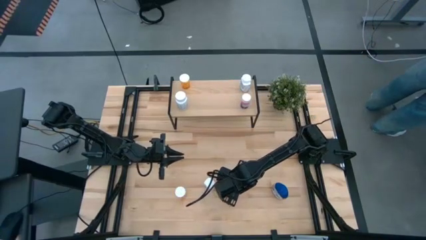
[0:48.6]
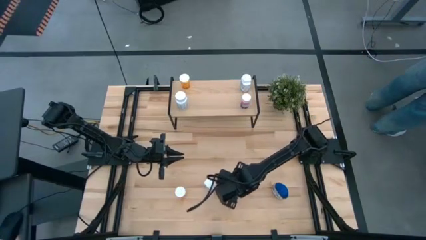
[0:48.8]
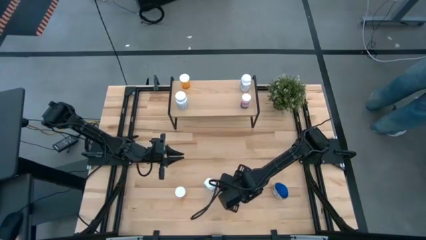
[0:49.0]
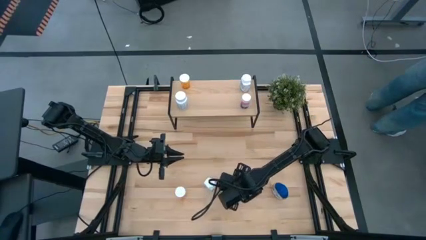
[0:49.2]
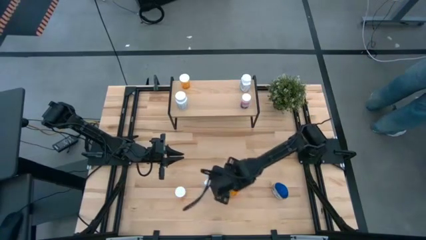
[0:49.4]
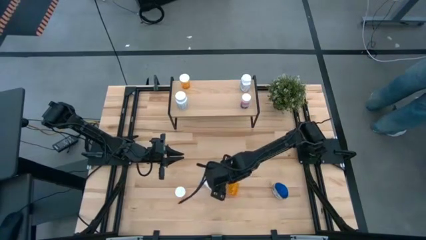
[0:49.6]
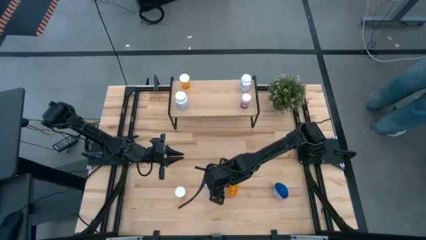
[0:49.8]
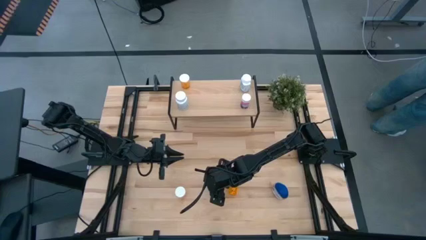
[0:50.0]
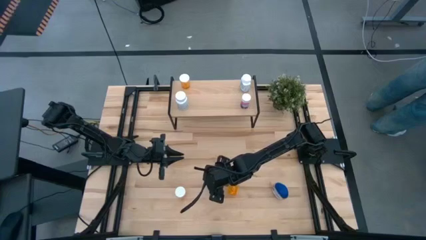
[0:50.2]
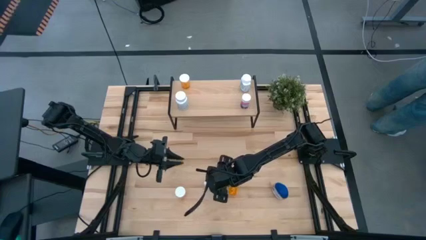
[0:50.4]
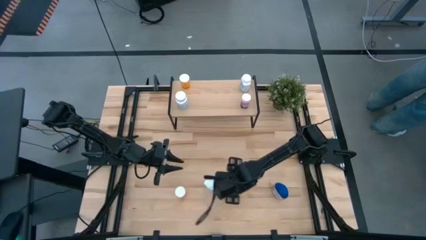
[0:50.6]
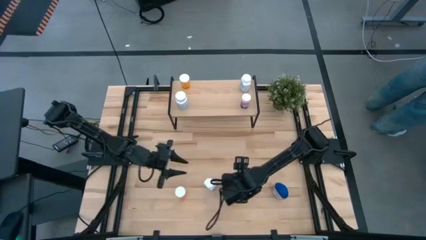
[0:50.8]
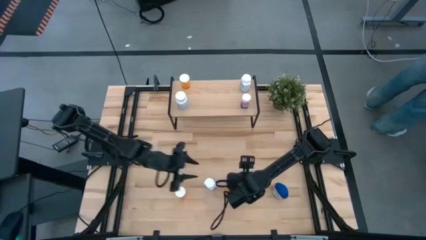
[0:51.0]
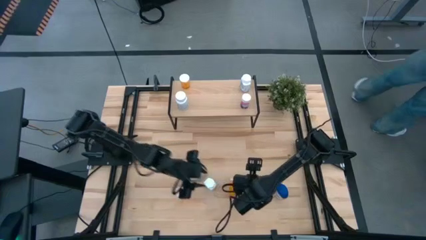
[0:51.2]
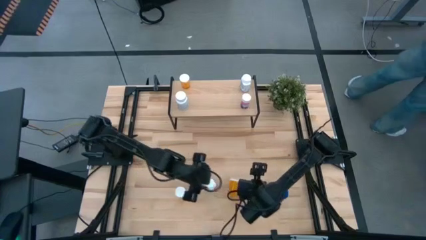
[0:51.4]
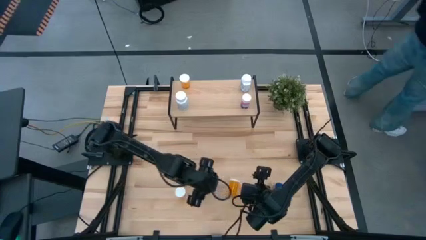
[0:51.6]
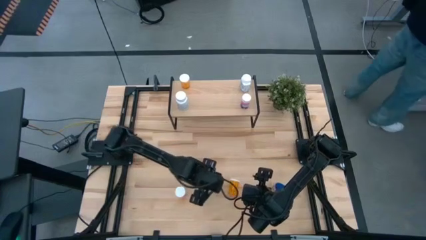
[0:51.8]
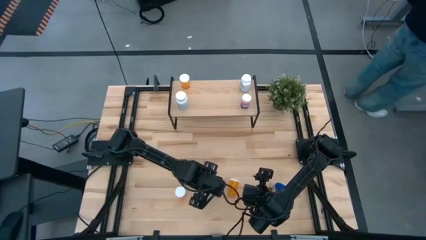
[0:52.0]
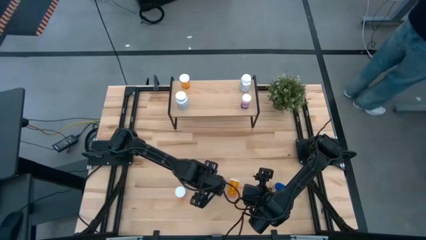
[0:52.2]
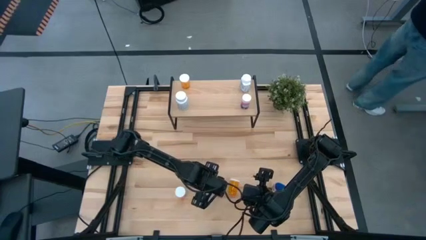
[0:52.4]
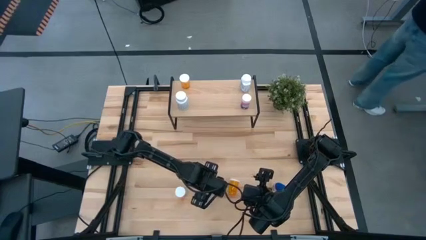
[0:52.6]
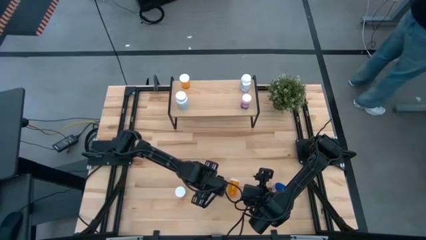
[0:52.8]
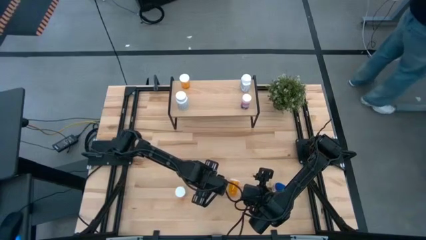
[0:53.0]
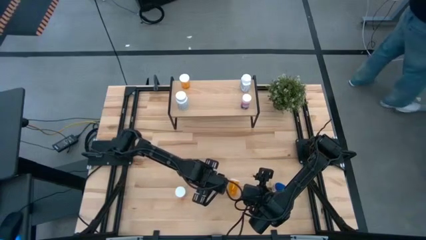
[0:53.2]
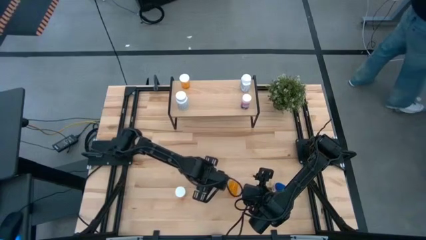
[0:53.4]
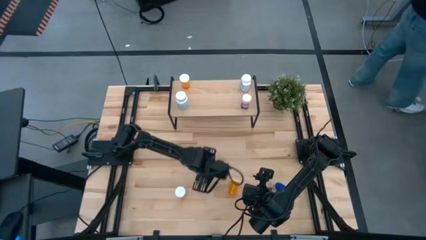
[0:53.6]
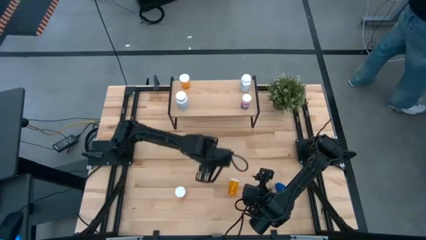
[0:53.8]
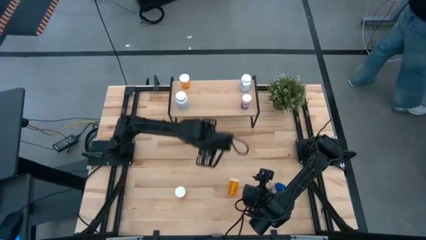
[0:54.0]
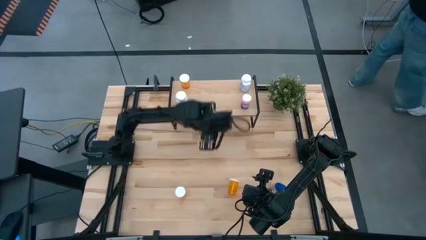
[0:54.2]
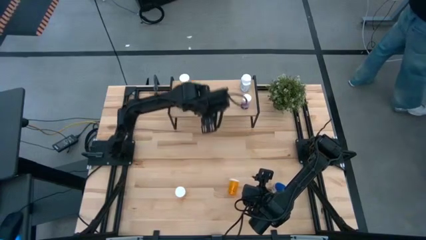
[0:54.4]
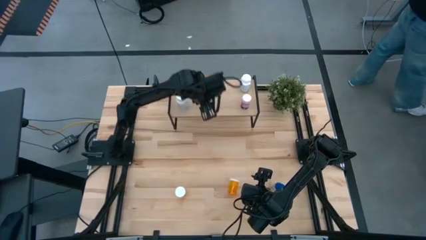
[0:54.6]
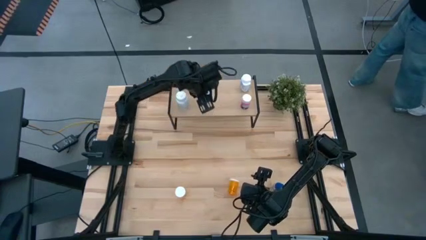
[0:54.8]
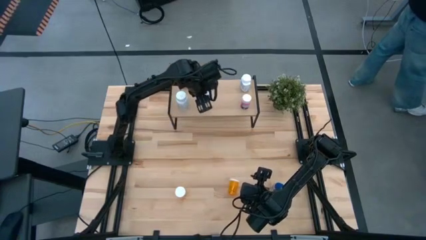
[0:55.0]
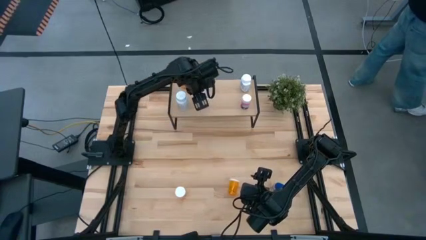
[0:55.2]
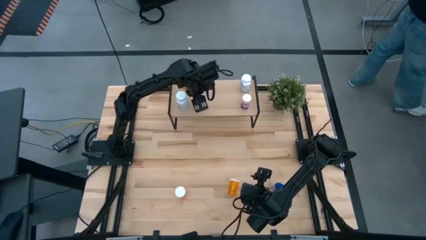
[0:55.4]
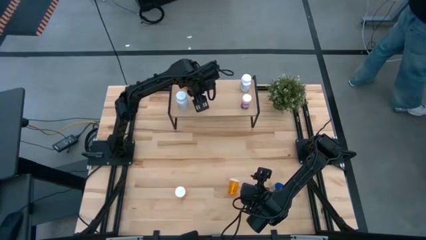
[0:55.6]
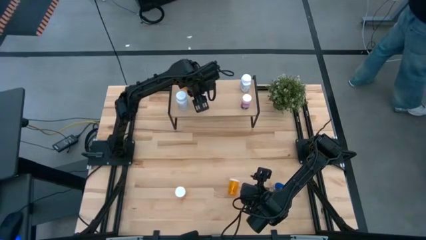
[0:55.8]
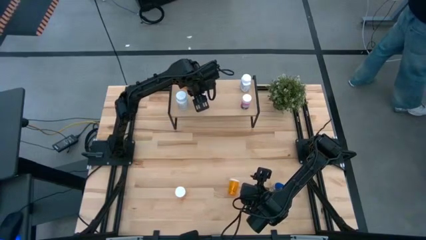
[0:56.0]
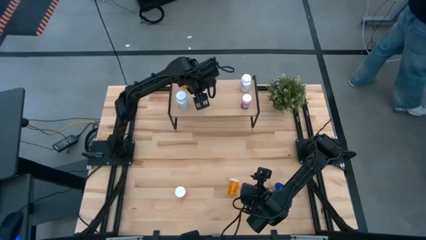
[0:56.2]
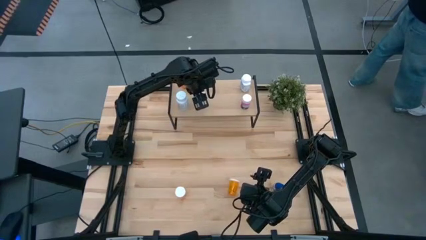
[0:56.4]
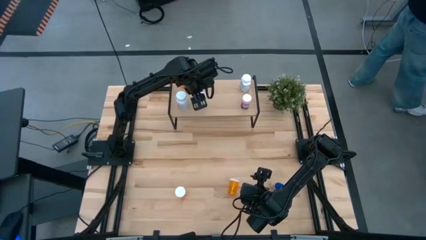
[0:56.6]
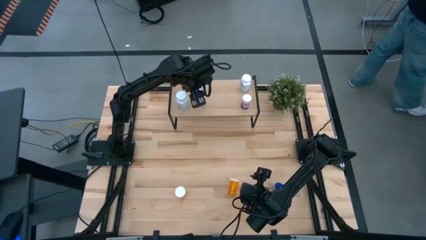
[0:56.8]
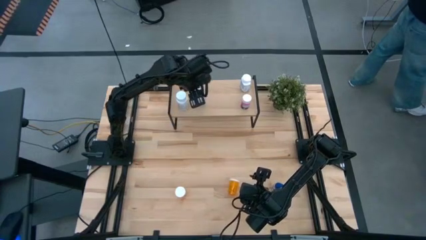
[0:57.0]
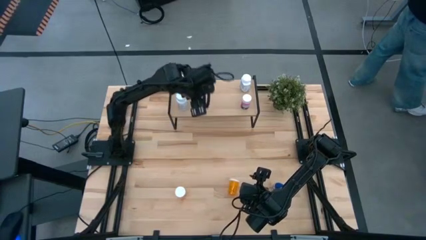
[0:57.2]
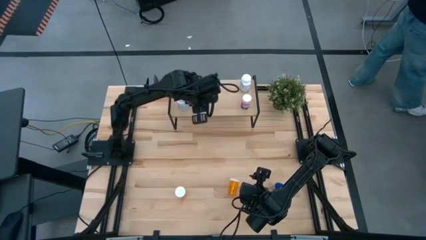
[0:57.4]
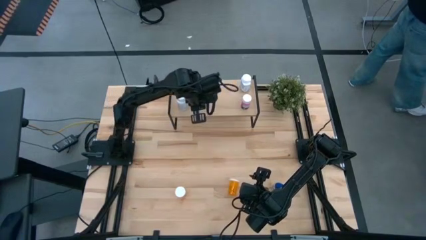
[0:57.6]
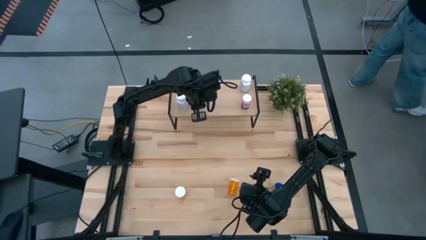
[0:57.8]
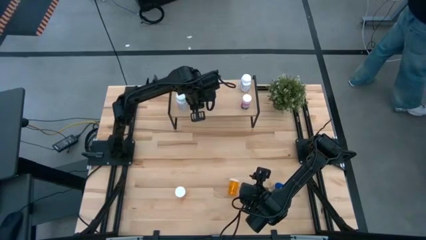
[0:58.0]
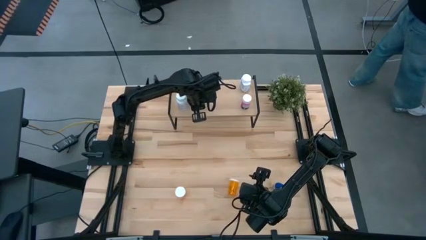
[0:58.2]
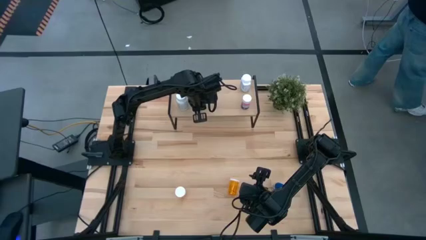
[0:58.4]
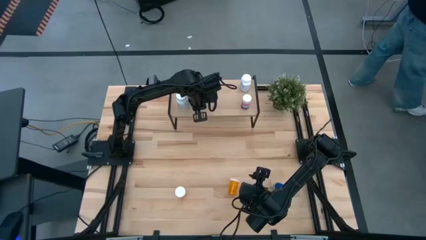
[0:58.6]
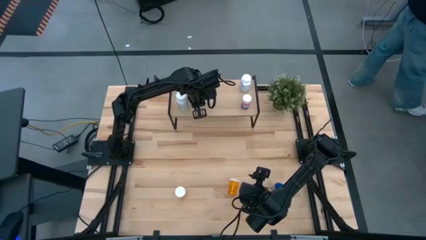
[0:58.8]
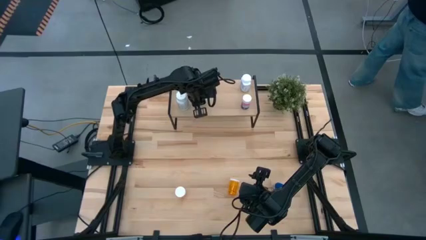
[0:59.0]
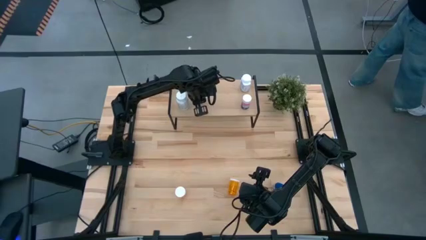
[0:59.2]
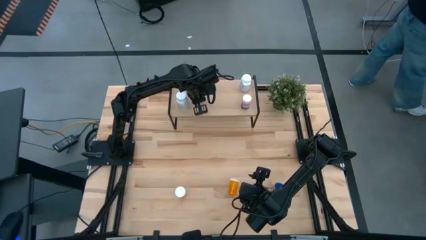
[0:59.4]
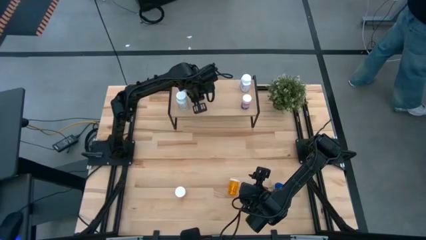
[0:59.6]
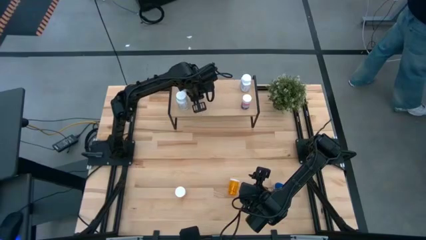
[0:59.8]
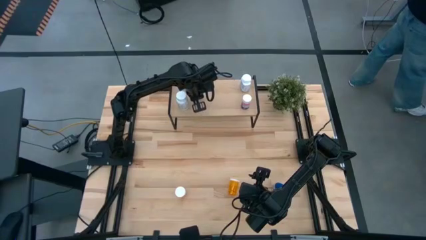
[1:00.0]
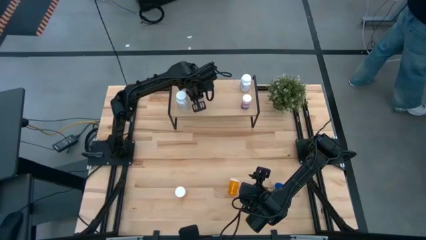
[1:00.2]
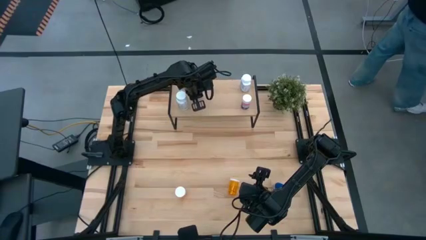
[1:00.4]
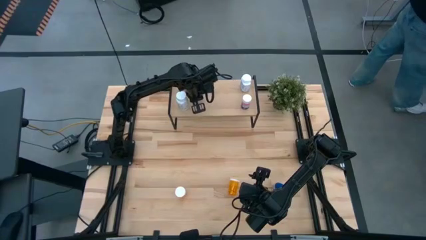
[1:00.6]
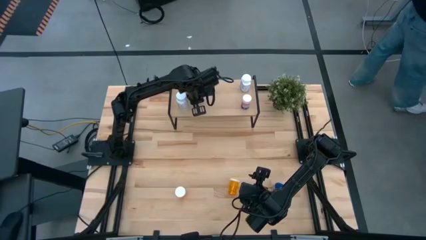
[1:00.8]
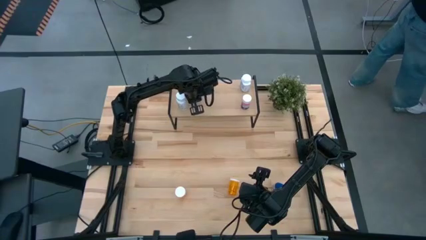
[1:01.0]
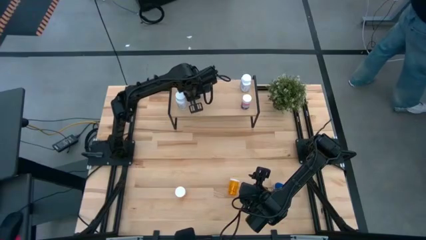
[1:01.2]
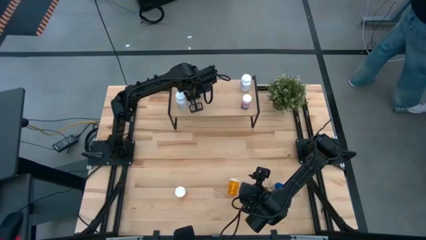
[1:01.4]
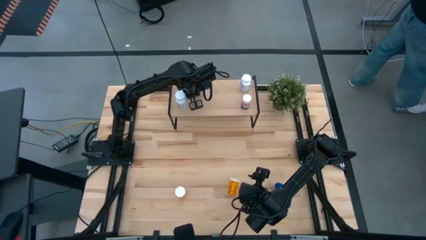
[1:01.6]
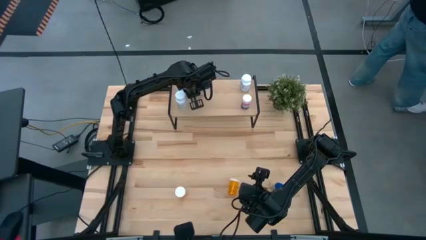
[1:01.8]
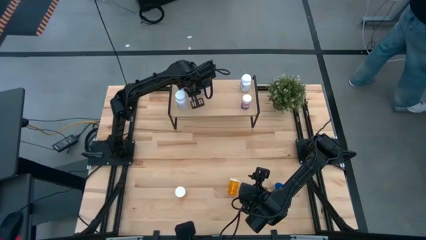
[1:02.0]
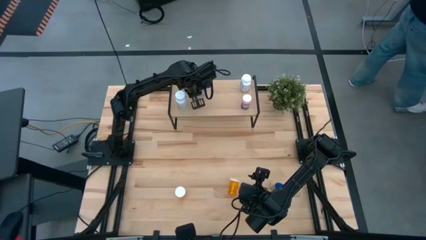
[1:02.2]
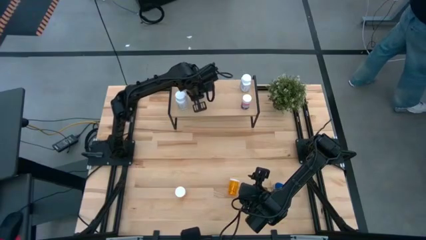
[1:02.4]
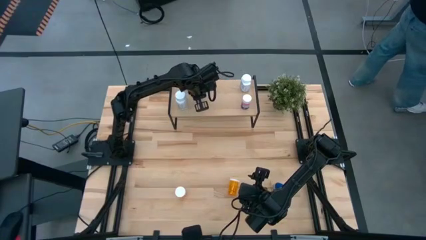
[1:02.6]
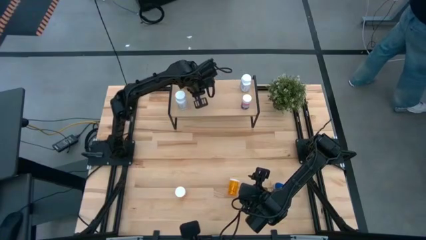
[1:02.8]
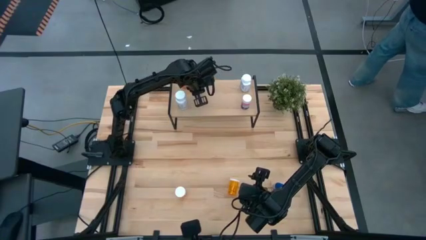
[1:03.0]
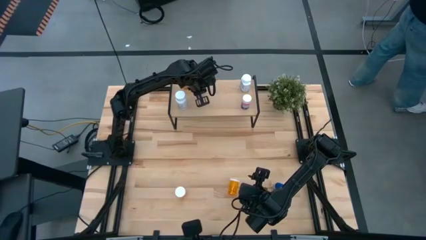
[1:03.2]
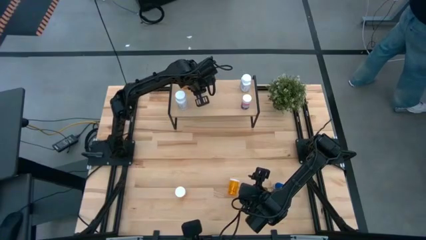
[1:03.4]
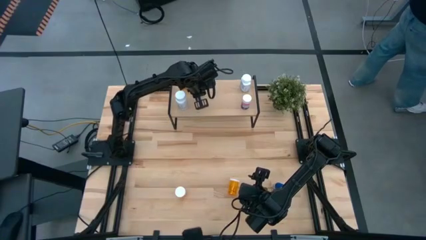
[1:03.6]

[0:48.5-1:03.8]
Task: Pick and place medicine bottles onto shelf by color
Put the white pill bottle on the shelf
